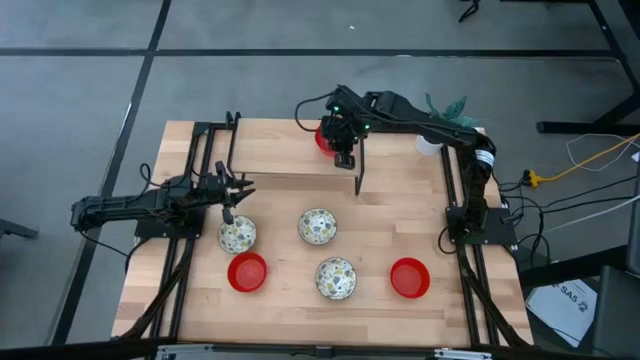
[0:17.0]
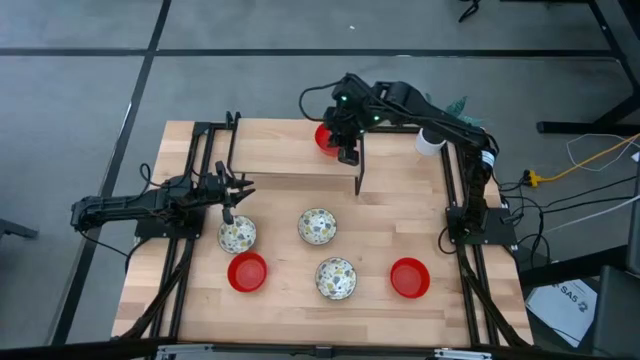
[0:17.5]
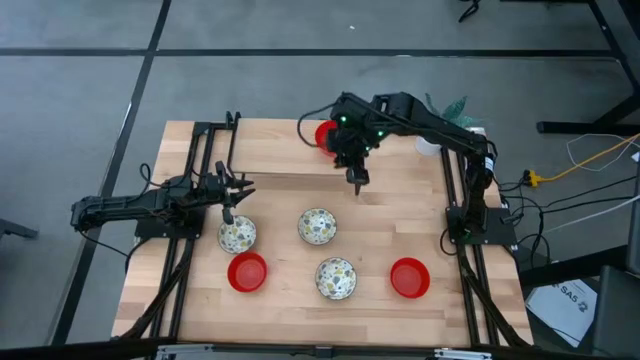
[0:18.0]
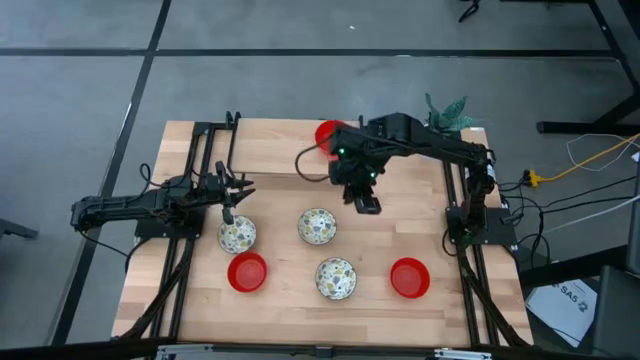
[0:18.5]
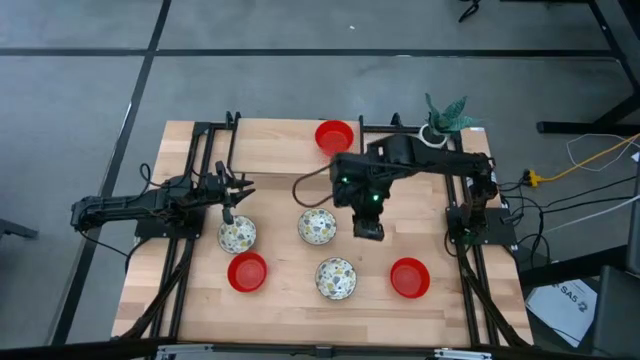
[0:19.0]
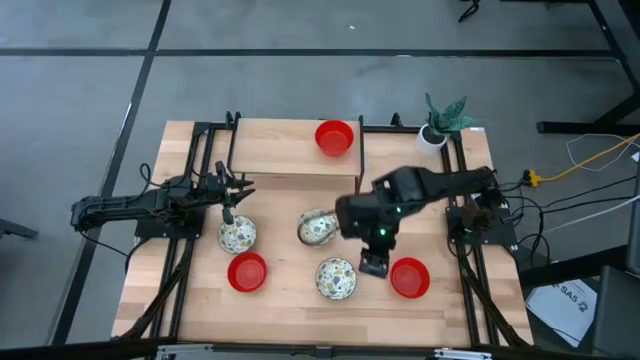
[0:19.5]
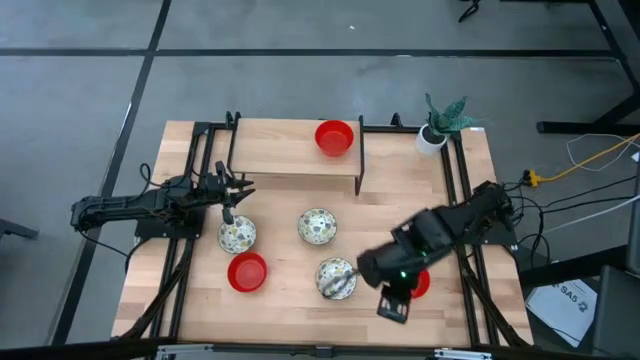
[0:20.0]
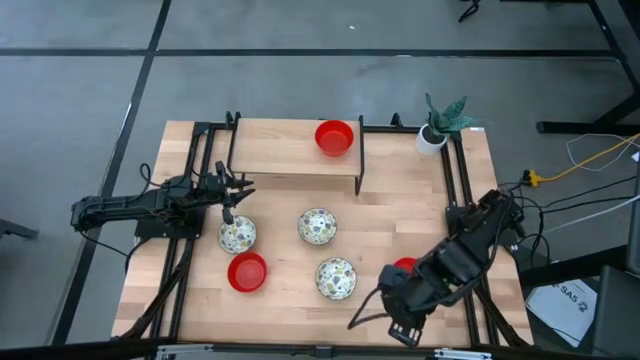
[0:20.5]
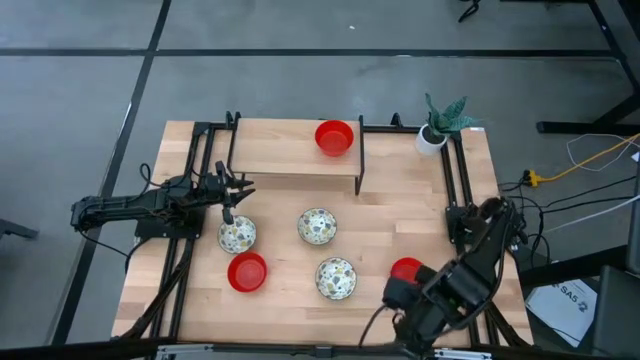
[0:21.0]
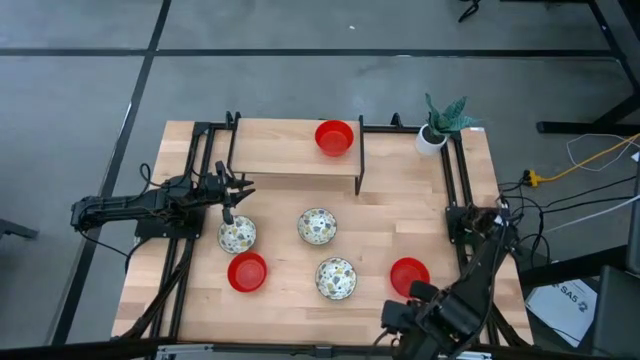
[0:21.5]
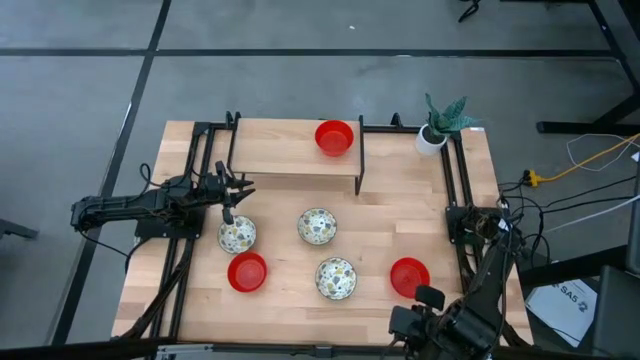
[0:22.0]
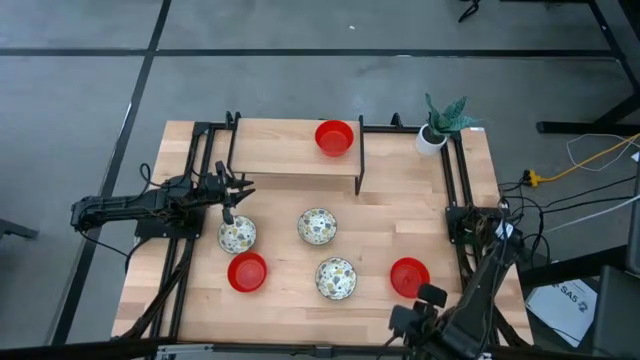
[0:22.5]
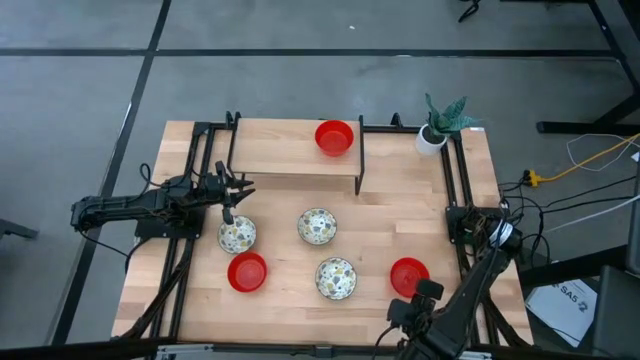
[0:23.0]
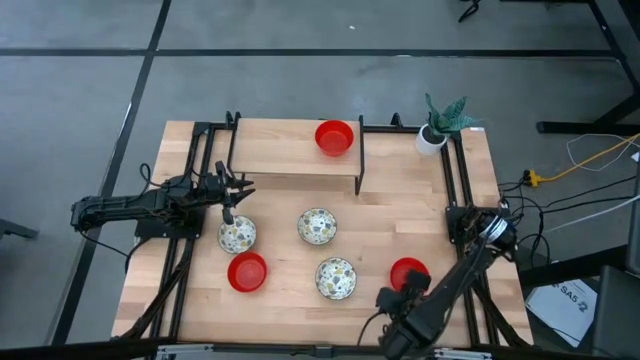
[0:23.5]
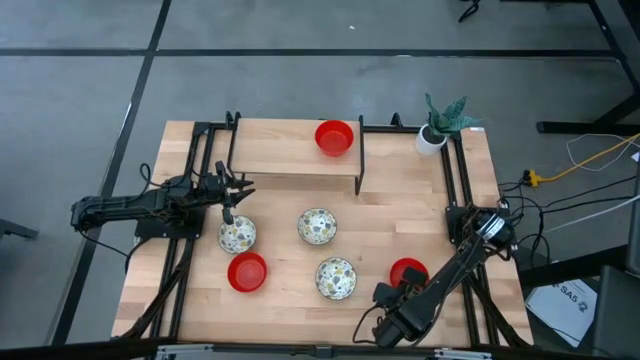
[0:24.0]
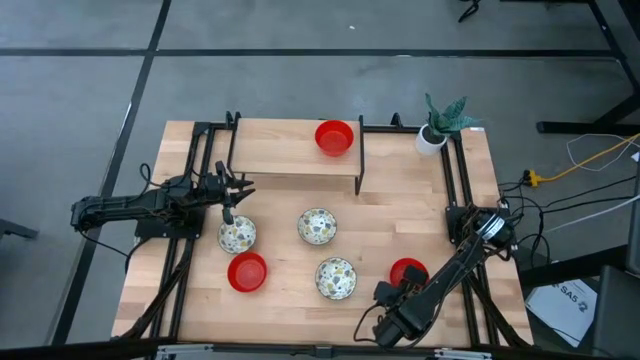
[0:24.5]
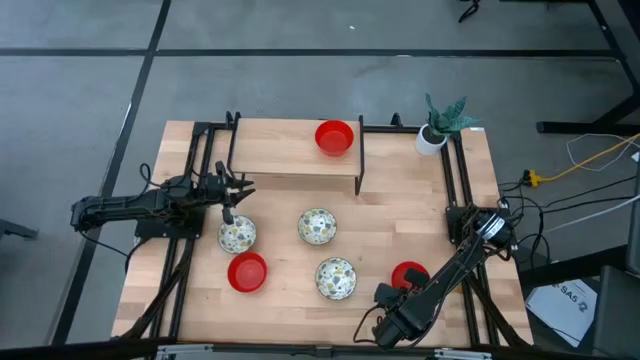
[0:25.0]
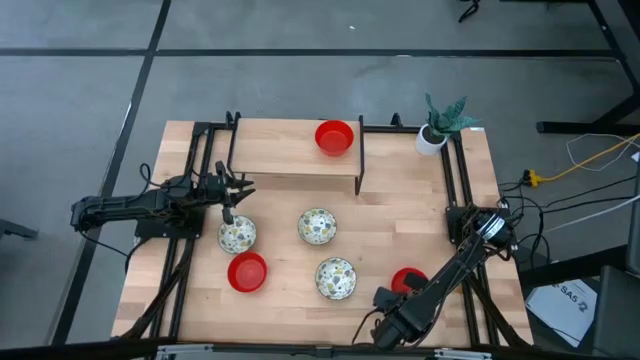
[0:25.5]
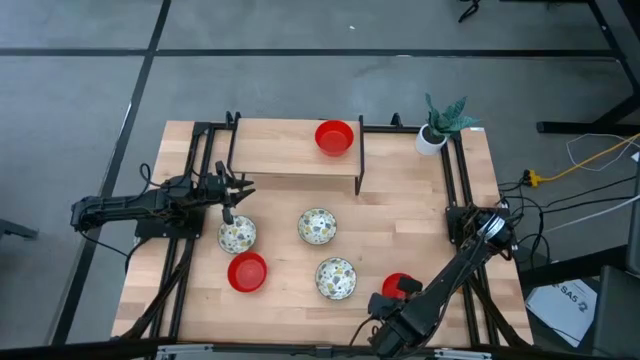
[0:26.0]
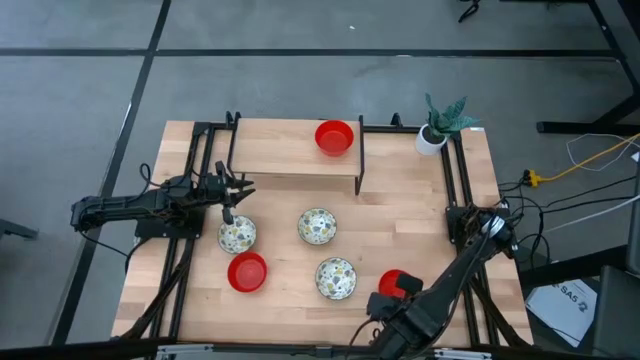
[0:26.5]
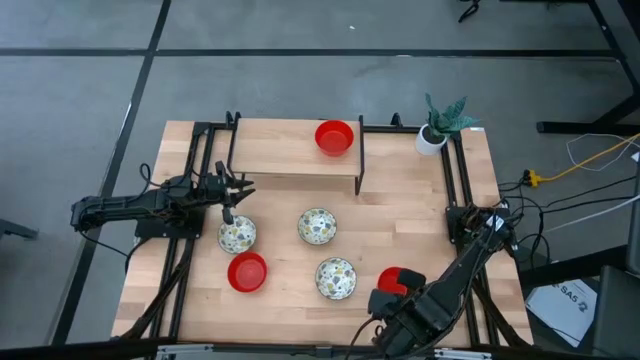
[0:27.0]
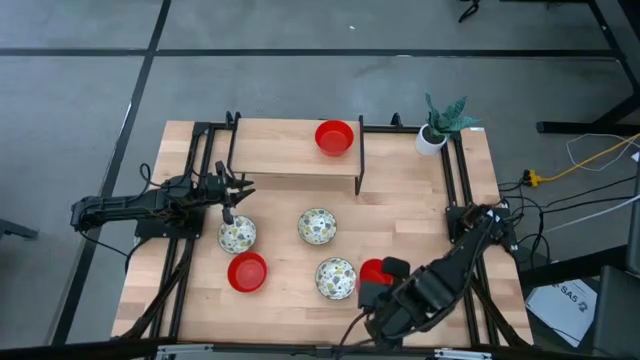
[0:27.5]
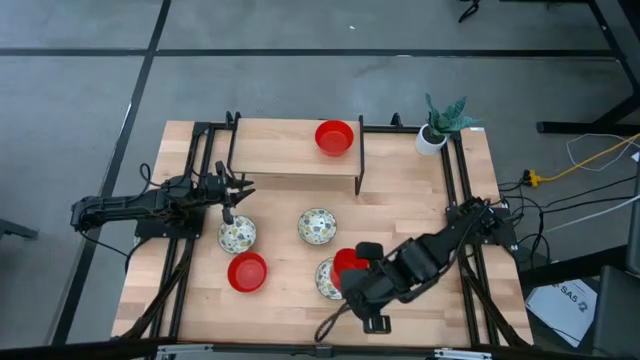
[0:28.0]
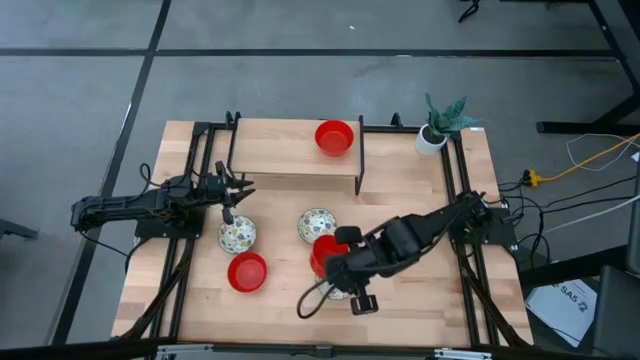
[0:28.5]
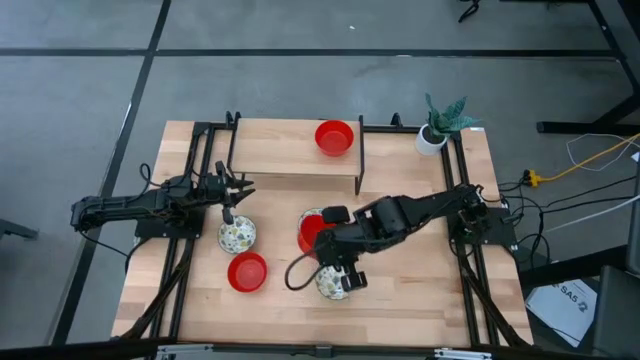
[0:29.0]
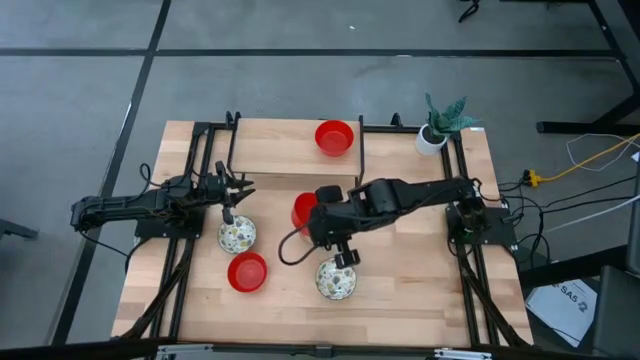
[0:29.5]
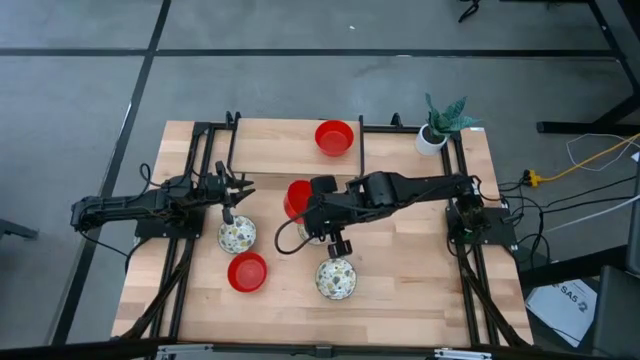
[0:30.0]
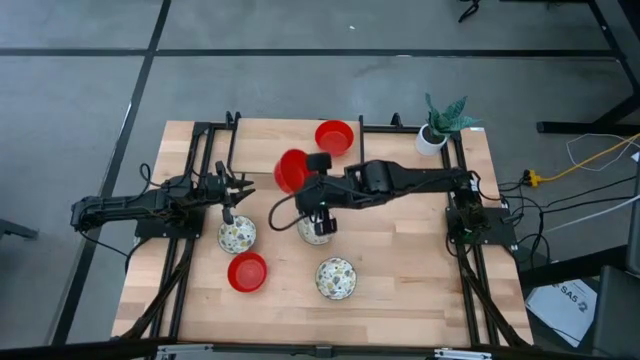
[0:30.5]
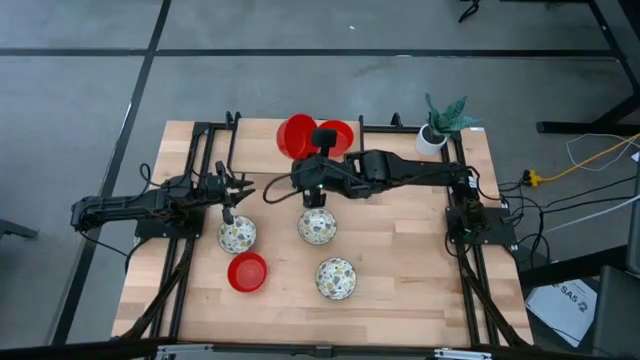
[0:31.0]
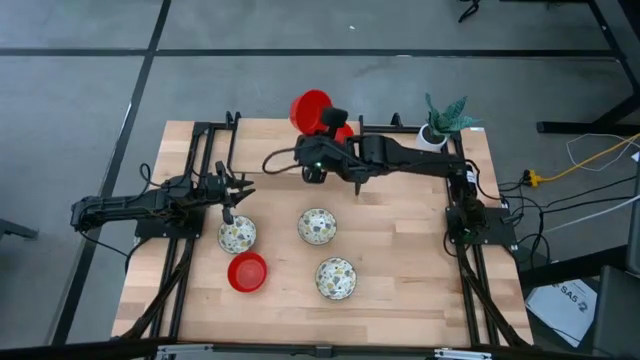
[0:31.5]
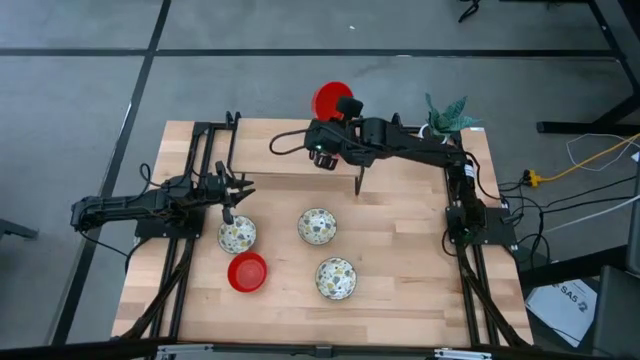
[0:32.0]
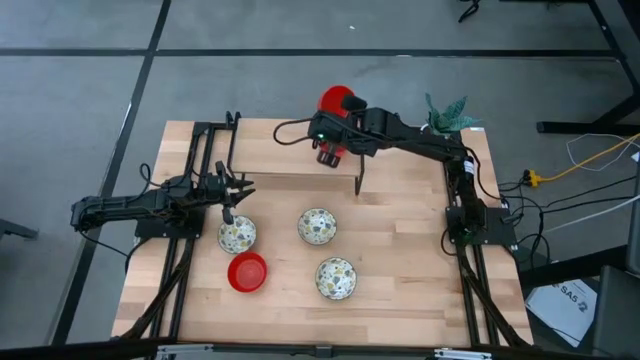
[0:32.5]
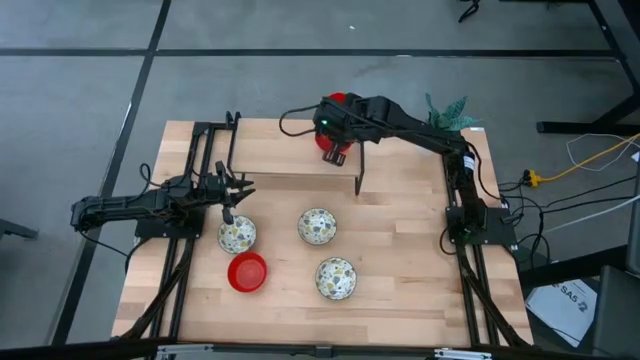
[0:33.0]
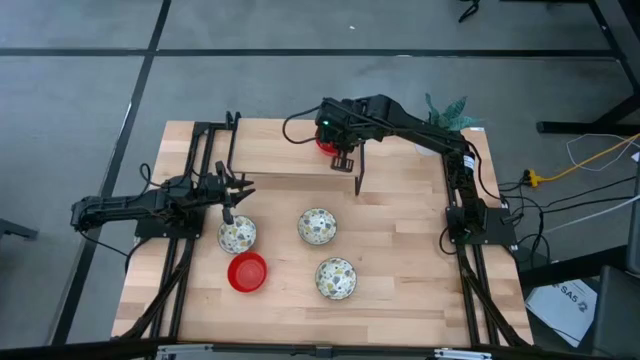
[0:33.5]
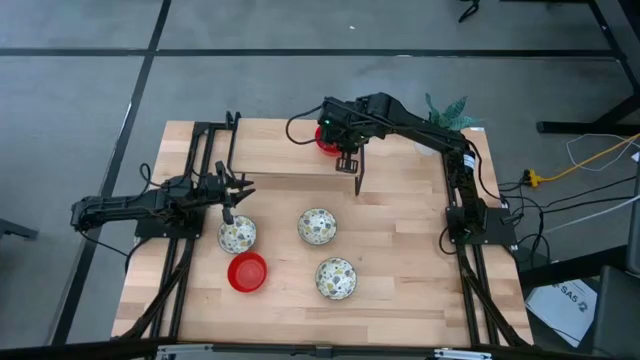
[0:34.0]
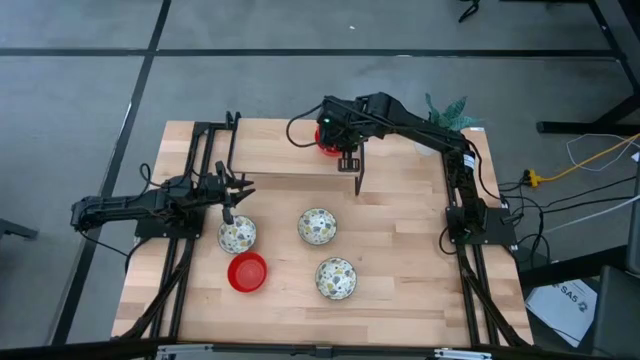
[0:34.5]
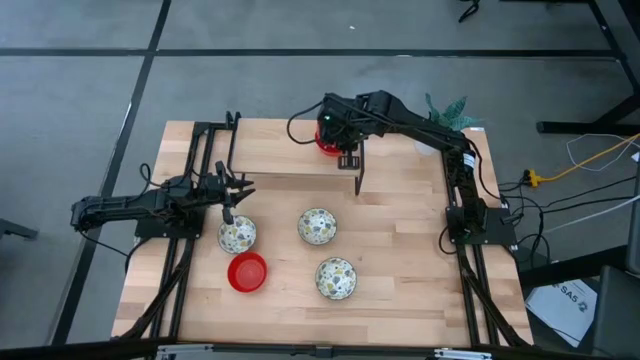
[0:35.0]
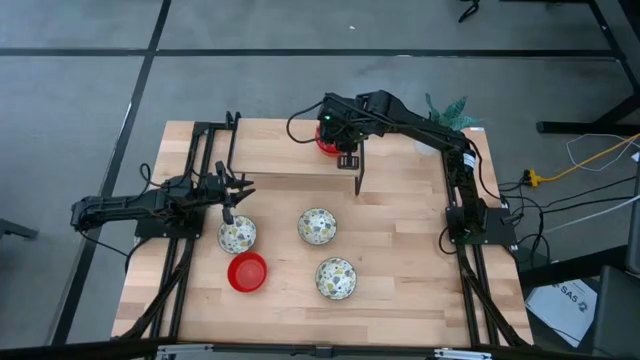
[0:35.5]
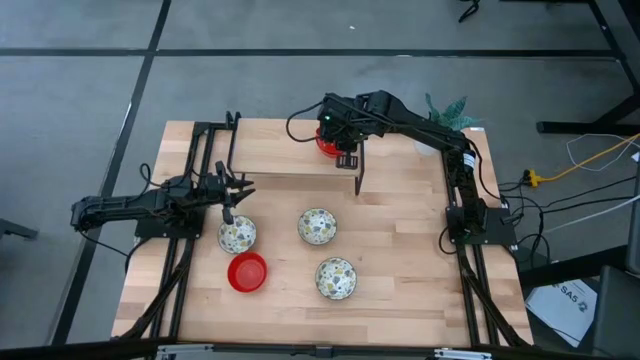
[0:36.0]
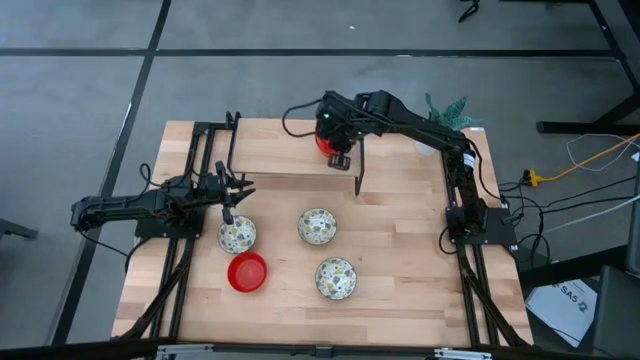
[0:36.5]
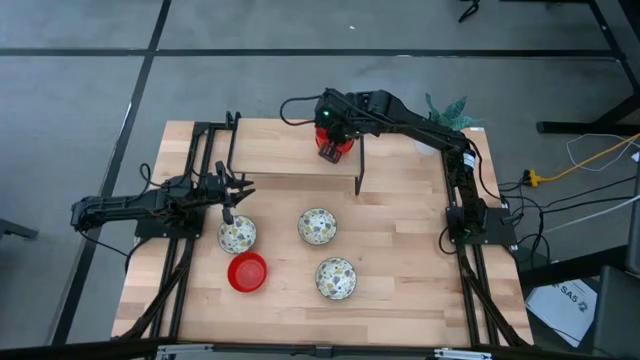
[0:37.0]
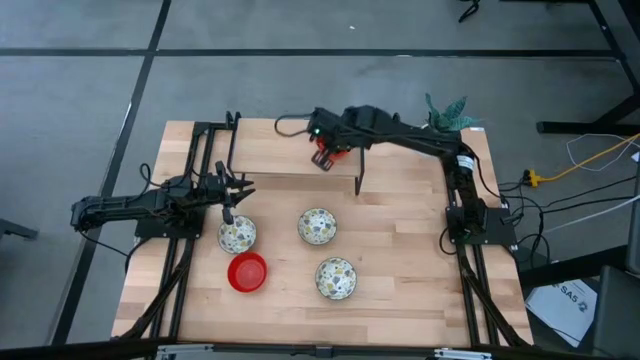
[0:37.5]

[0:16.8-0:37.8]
Task: Pick & Place Mini bowls
Stack the right red bowl on the red bowl on the shelf
